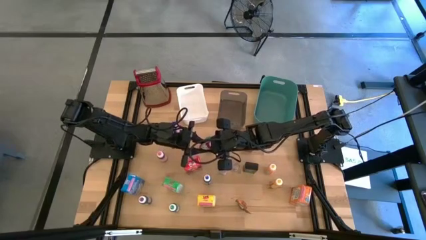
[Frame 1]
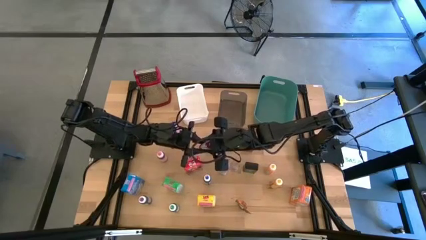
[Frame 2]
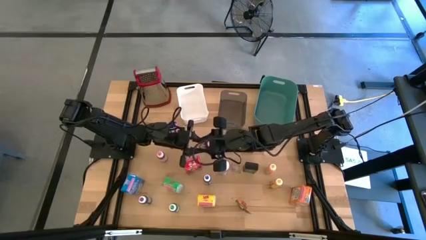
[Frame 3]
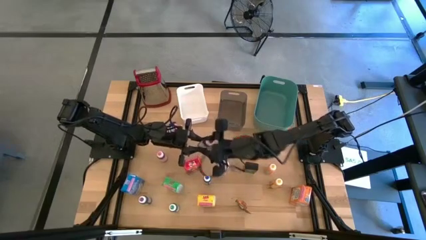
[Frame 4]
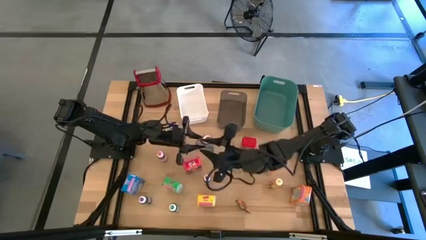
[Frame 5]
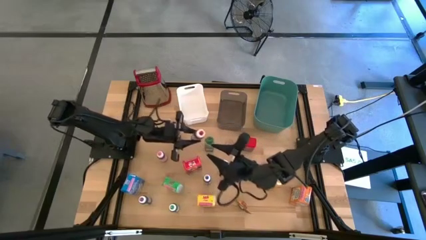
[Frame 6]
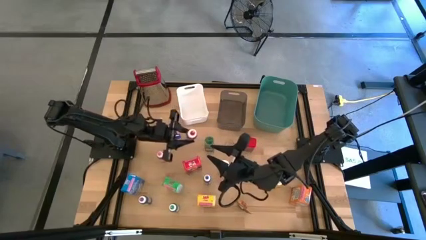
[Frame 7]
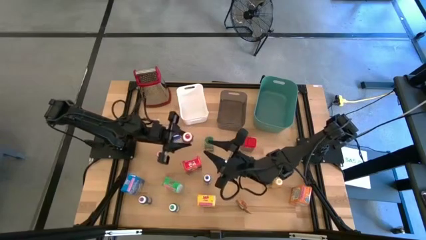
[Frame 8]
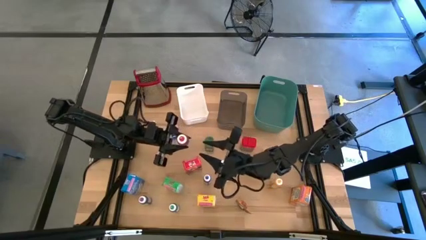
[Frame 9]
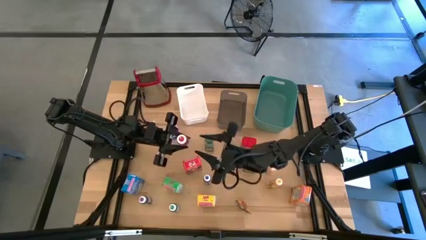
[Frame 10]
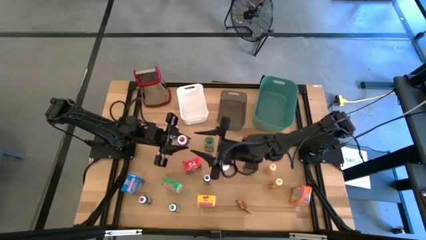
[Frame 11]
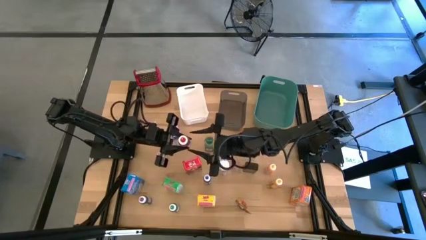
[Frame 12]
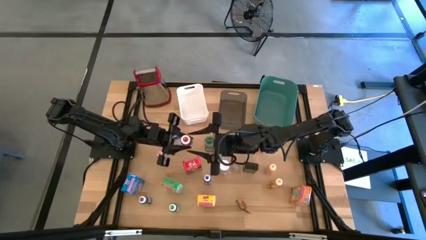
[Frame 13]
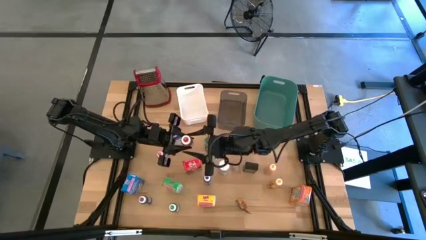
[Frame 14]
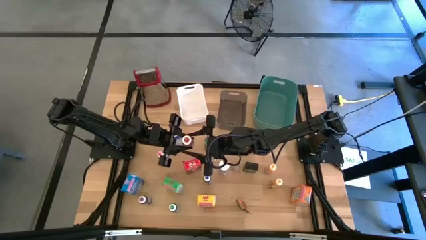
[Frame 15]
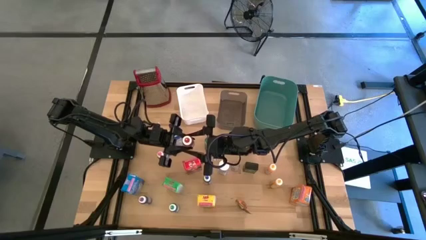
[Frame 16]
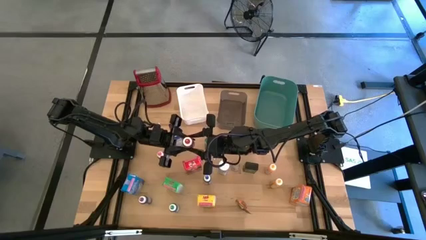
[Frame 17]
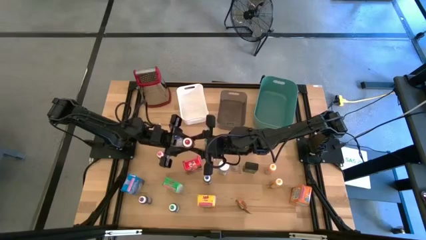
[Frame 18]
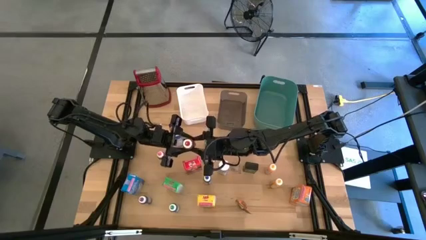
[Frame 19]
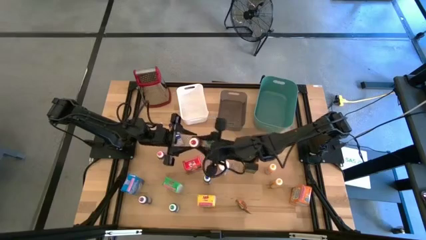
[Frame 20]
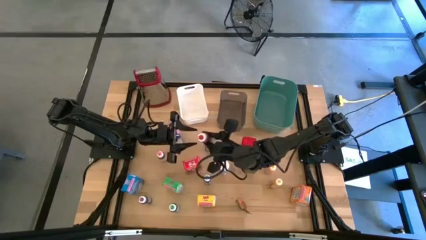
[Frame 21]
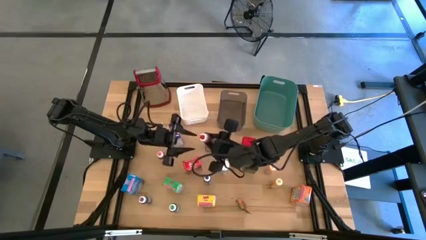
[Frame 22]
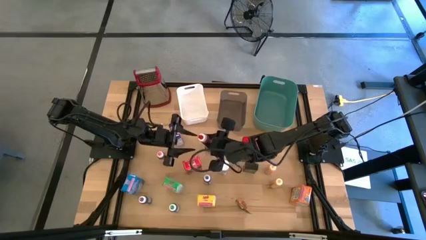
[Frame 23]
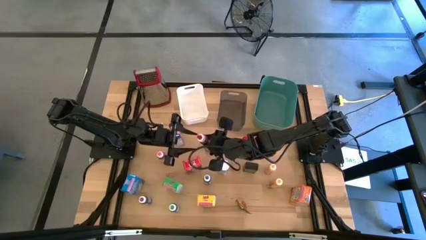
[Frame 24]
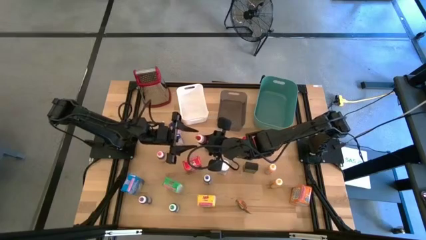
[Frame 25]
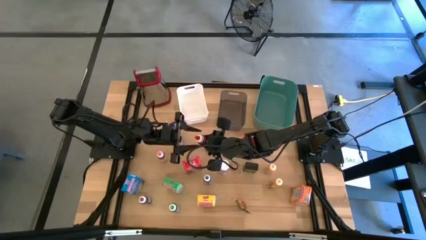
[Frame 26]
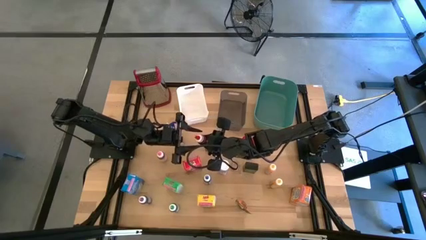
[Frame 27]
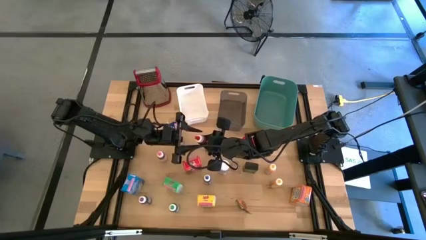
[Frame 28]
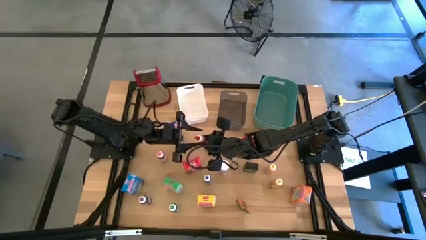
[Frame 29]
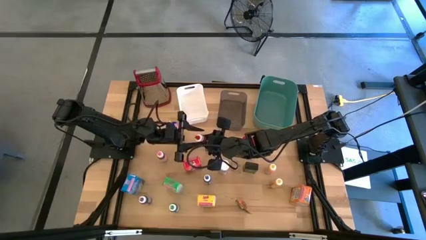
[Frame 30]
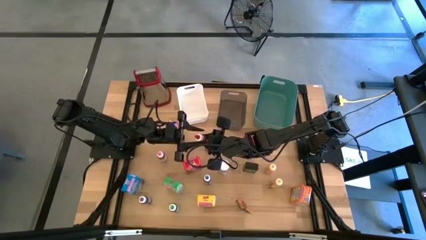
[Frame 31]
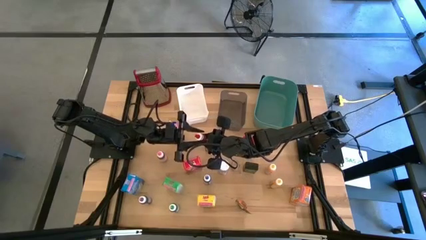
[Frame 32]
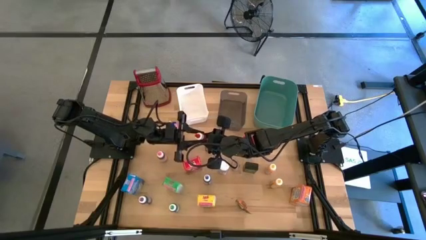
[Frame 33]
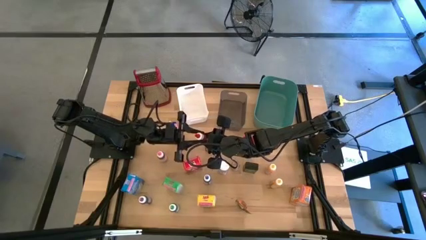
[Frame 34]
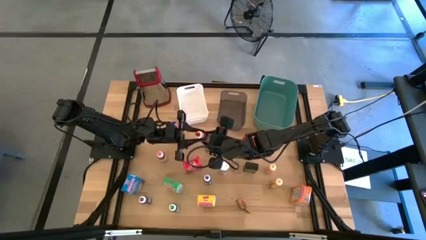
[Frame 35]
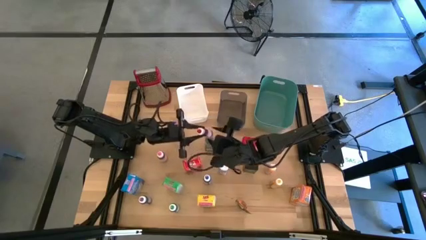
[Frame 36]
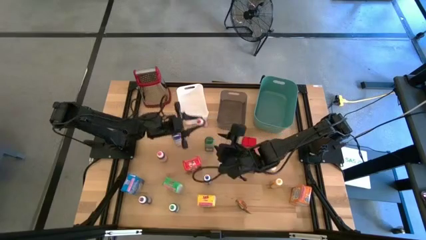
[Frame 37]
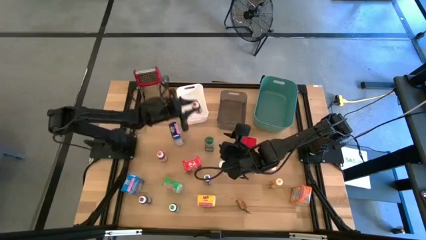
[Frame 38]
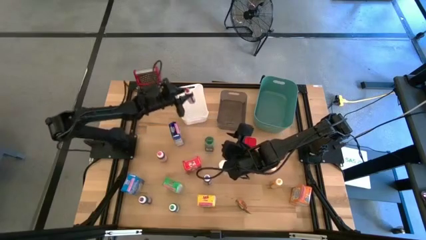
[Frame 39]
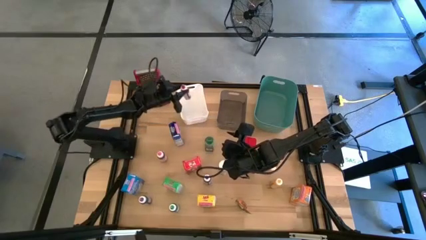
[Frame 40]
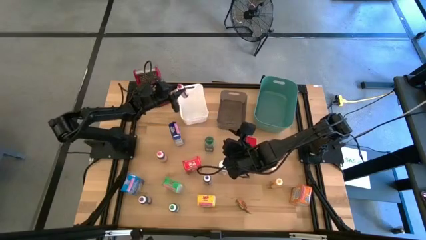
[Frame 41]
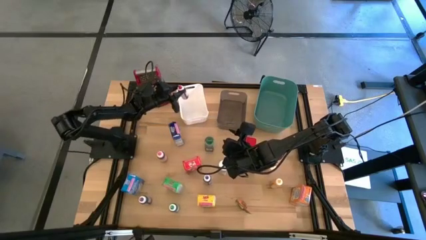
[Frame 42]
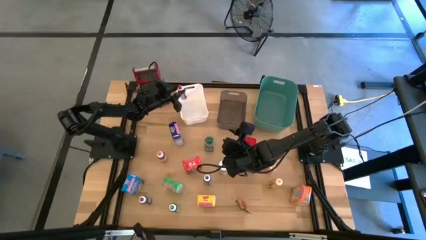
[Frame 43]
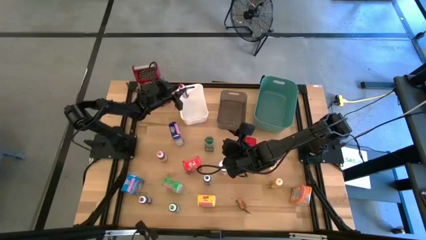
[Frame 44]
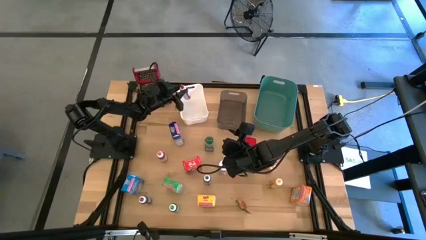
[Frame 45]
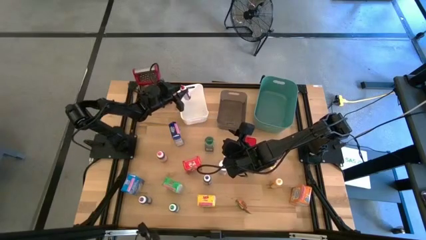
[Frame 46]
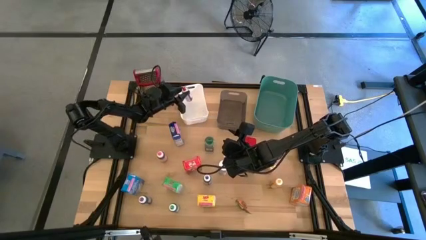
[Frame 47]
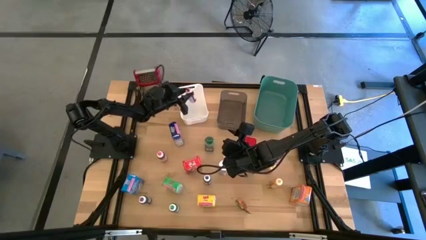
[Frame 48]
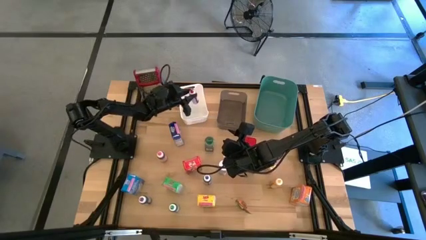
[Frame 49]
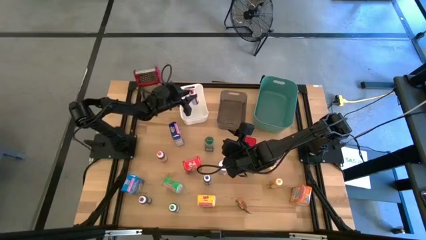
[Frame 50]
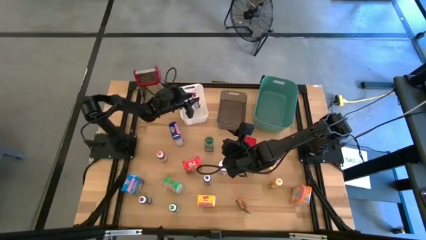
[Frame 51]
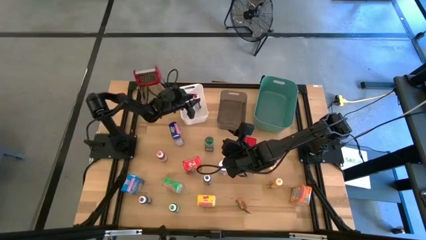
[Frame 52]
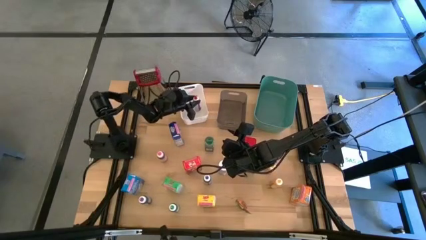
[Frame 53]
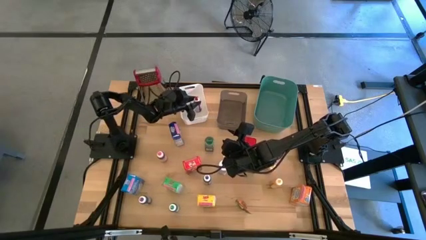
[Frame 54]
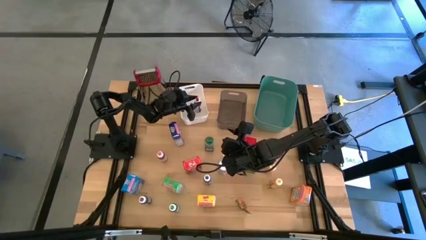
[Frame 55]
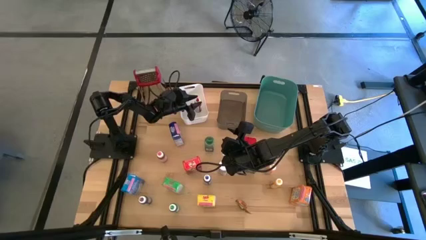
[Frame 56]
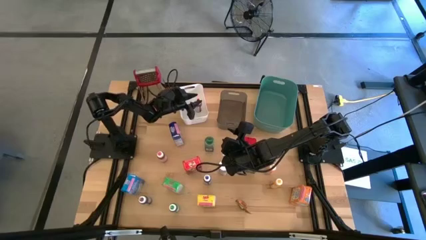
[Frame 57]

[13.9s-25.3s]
Task: Pick & Place Kitchen Items
Put the red food coloring into the white bin

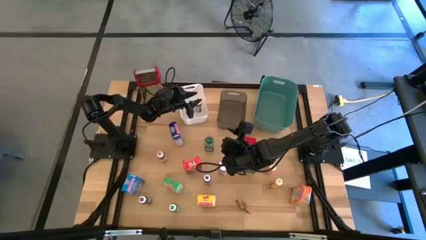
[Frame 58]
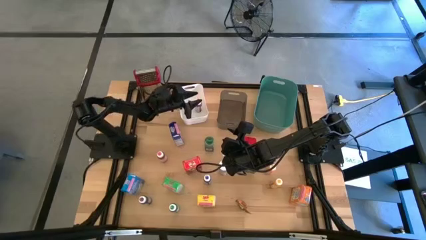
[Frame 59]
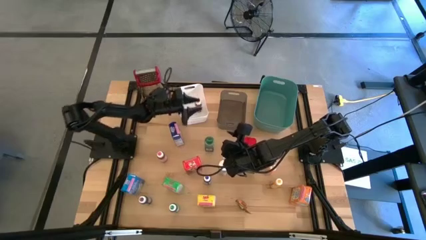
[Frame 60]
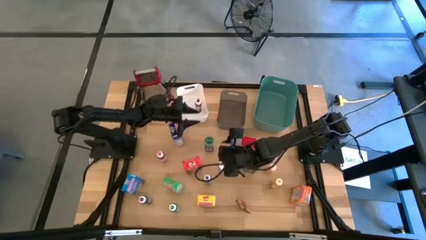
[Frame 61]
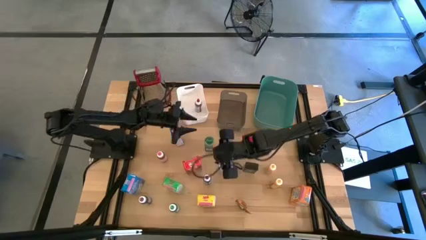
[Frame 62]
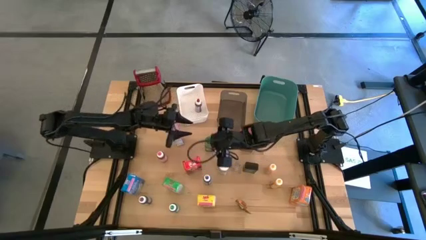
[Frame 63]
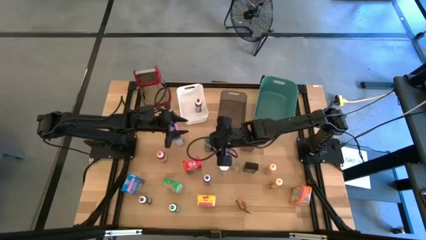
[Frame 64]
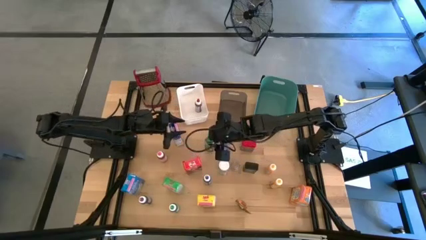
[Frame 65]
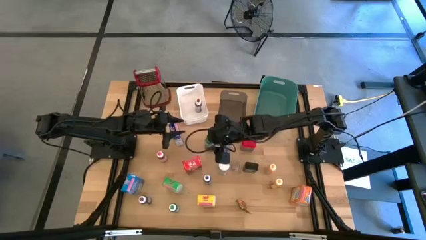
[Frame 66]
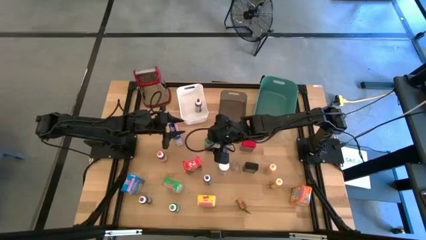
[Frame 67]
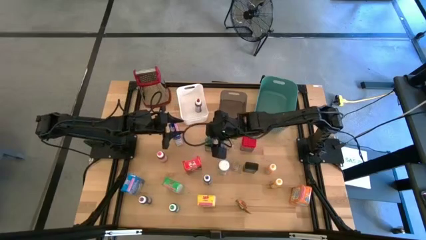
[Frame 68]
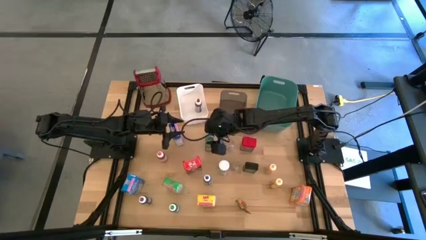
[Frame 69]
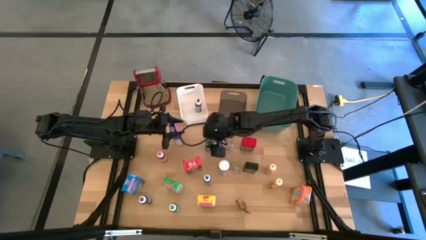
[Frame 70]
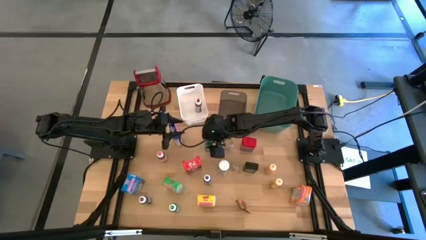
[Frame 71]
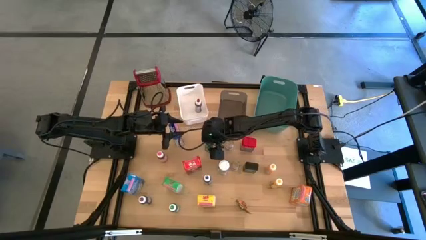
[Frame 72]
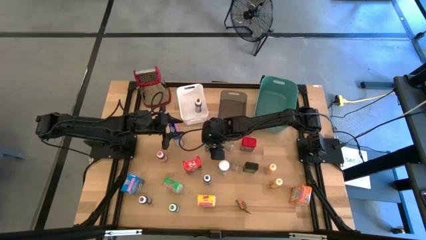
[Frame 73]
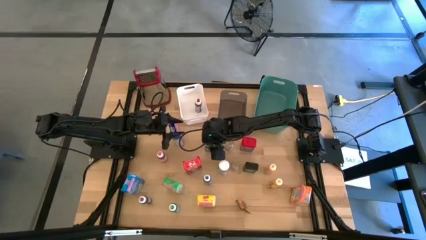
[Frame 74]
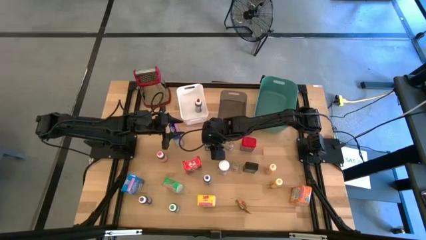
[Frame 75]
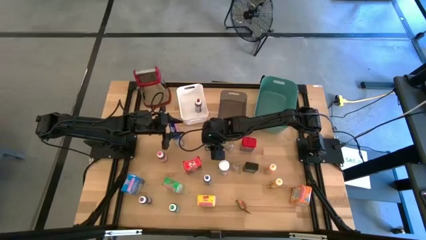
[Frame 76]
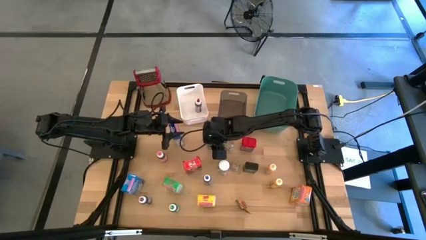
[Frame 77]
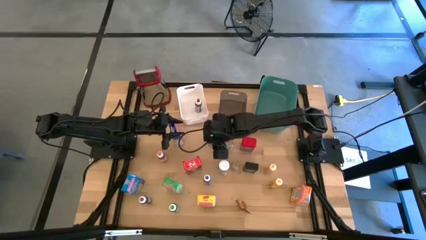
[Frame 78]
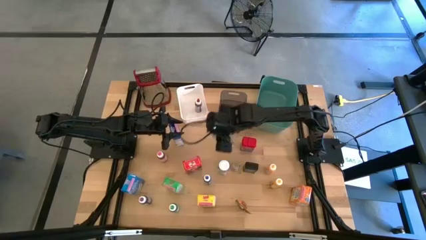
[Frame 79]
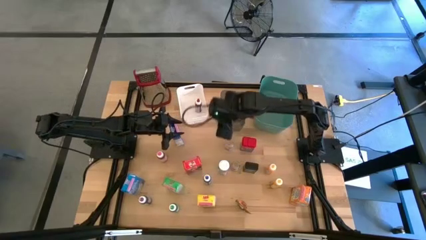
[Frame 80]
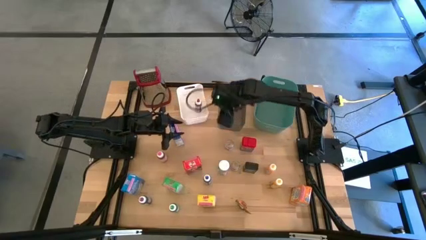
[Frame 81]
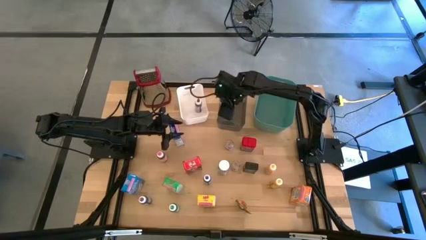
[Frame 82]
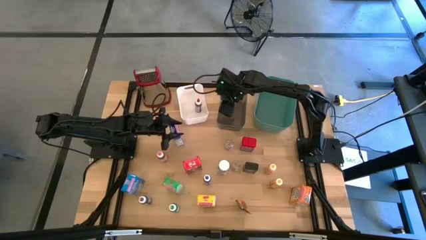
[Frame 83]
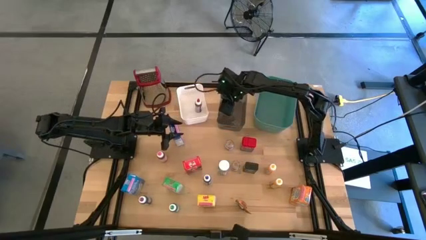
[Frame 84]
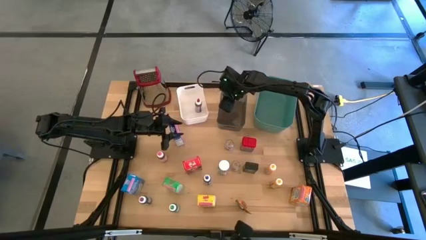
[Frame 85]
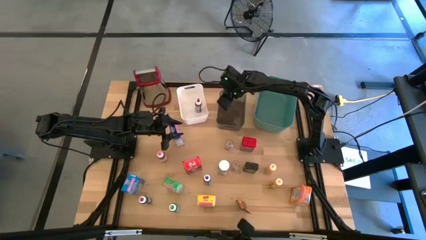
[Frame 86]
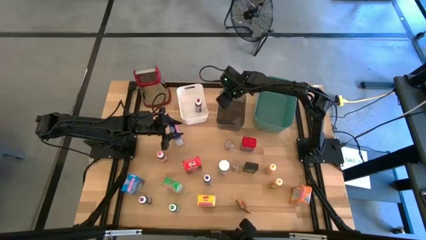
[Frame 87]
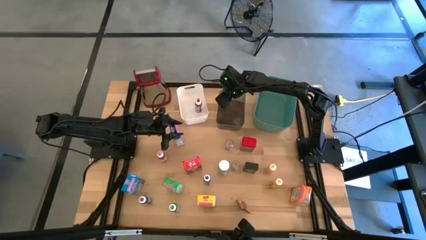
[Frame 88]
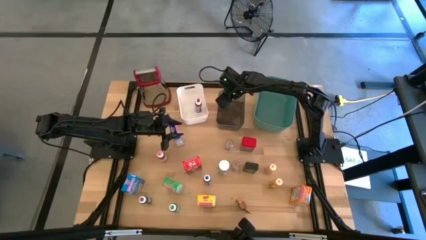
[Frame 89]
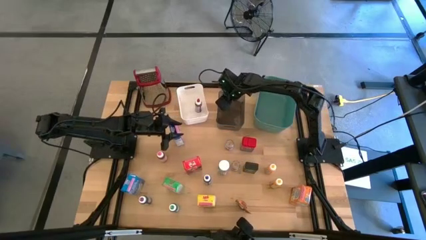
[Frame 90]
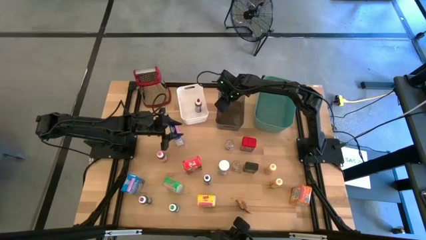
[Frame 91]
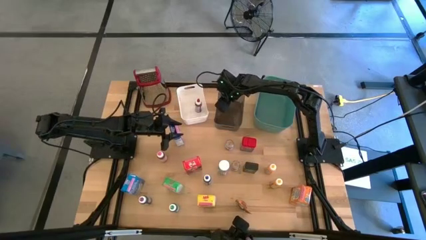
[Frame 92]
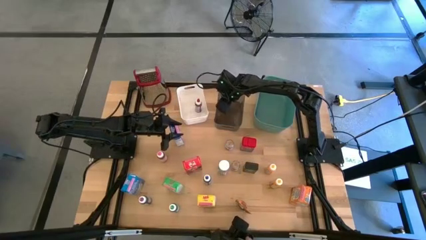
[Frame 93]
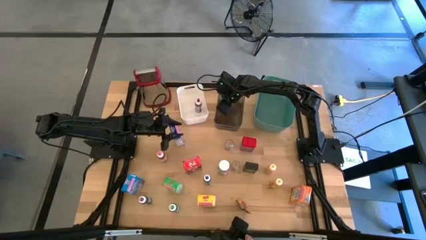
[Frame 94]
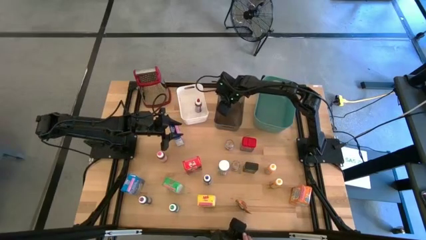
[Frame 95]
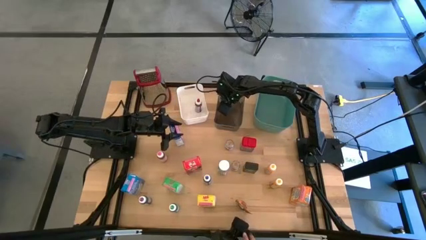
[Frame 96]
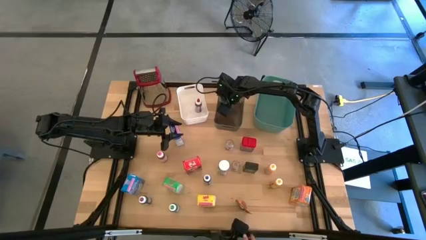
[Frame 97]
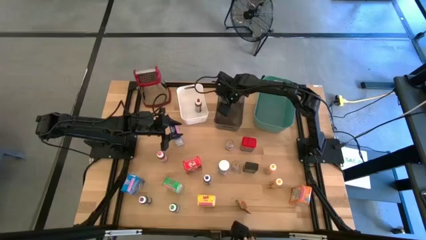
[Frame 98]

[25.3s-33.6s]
Put the green spice bottle into the black bin
